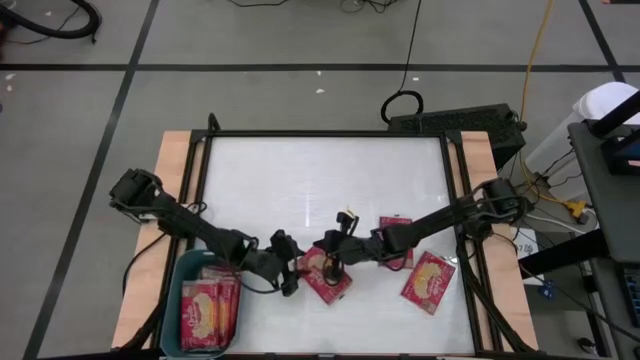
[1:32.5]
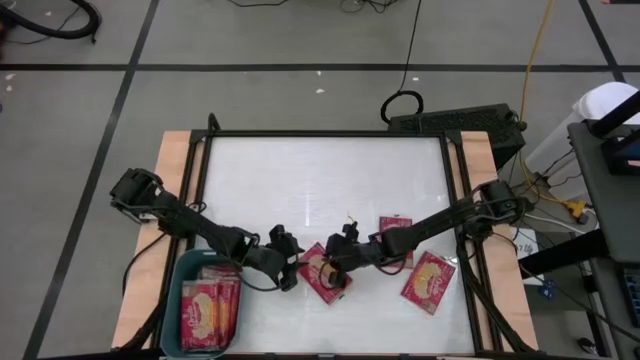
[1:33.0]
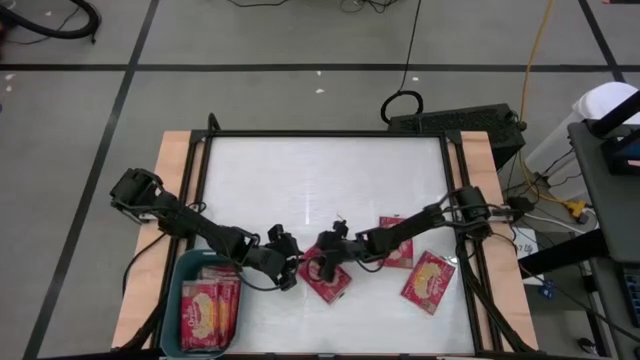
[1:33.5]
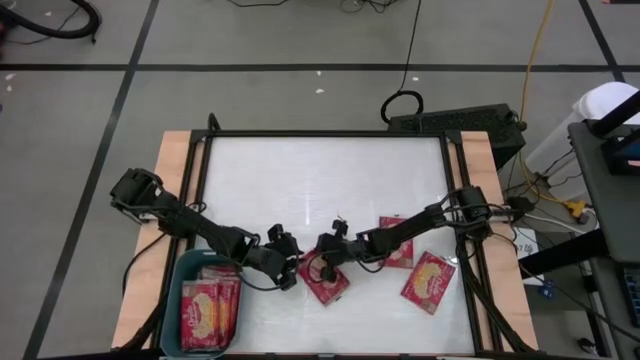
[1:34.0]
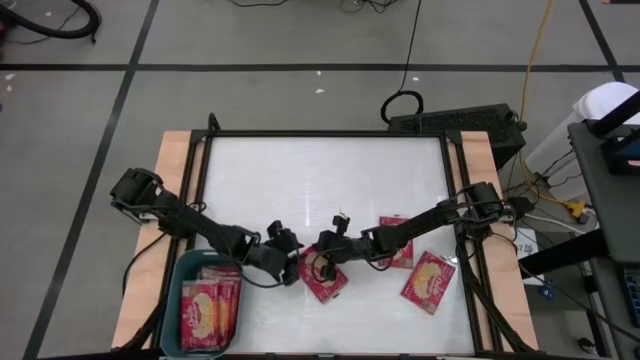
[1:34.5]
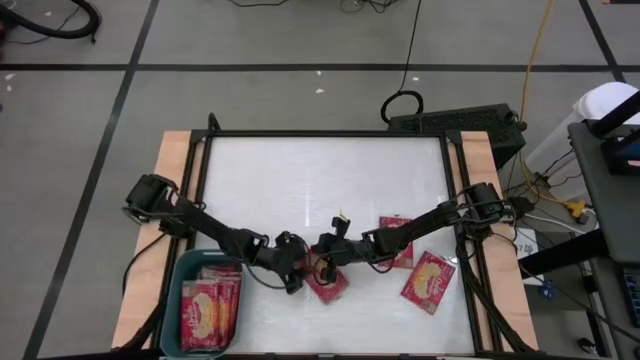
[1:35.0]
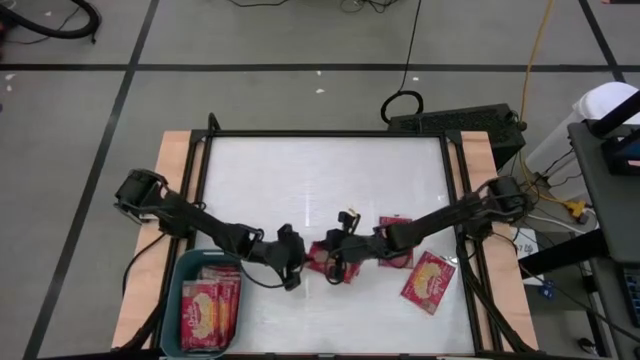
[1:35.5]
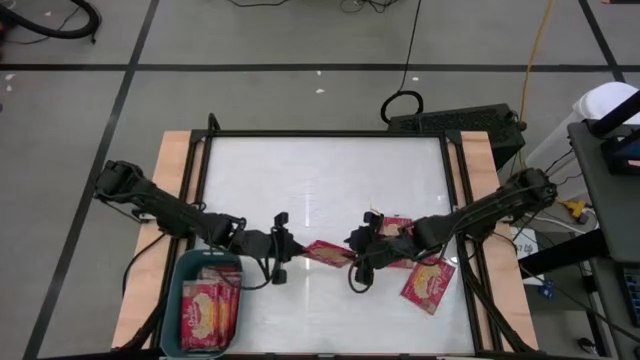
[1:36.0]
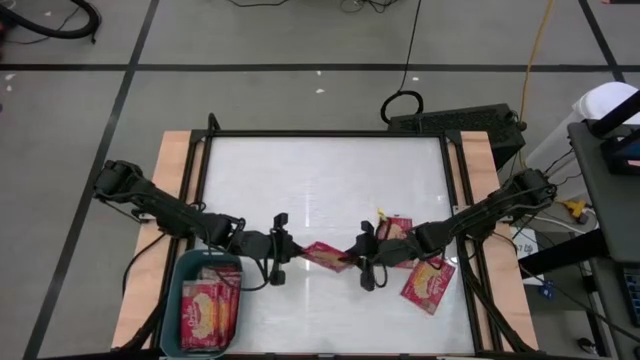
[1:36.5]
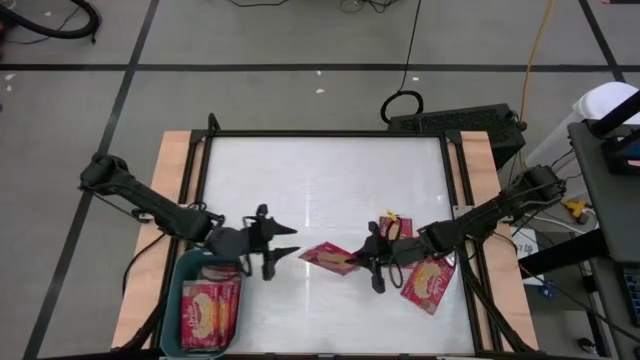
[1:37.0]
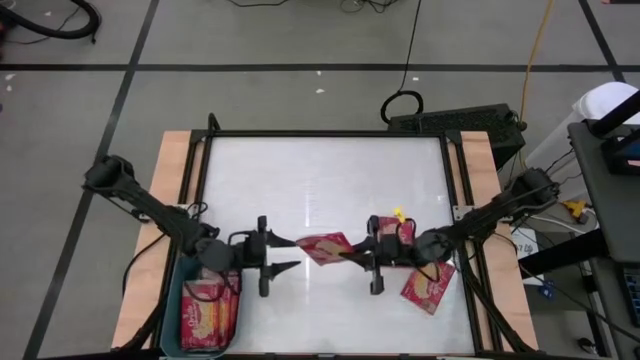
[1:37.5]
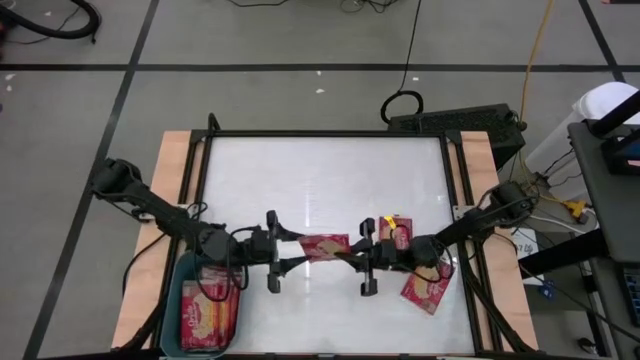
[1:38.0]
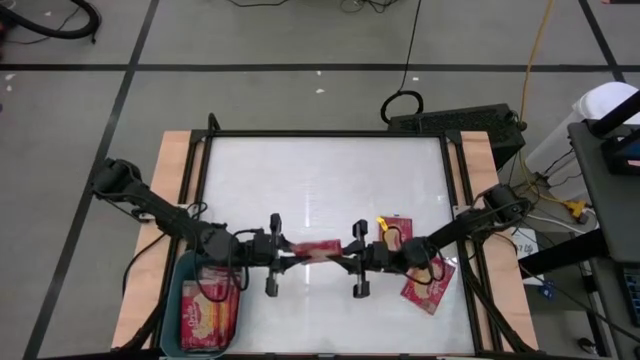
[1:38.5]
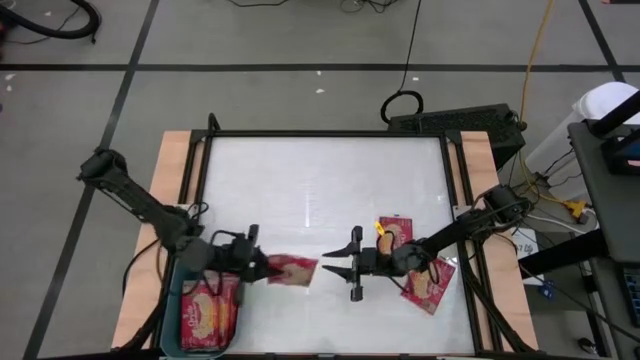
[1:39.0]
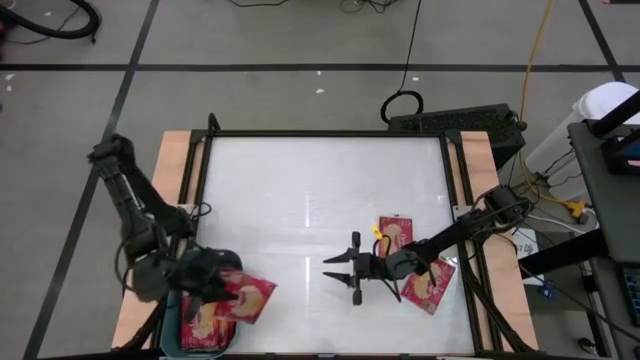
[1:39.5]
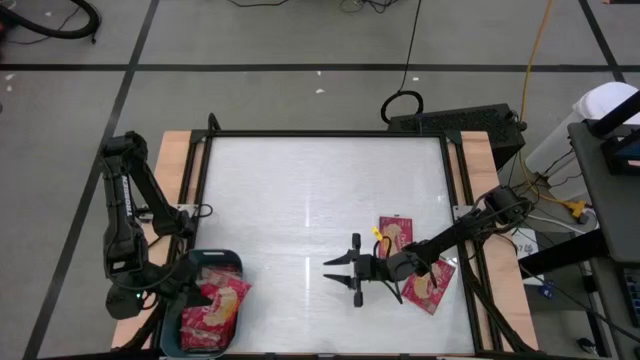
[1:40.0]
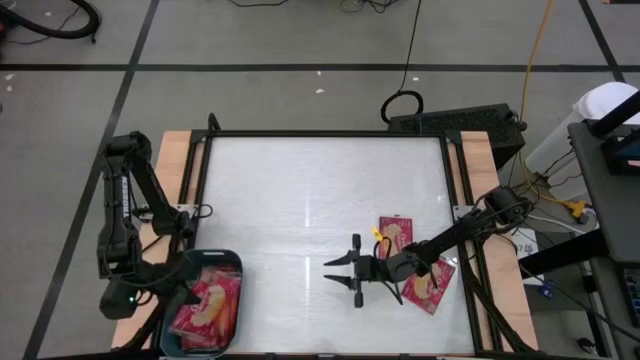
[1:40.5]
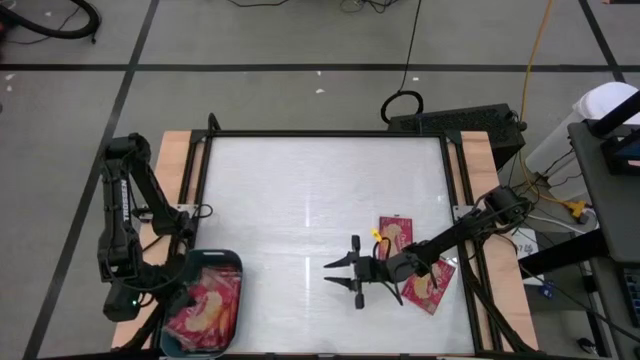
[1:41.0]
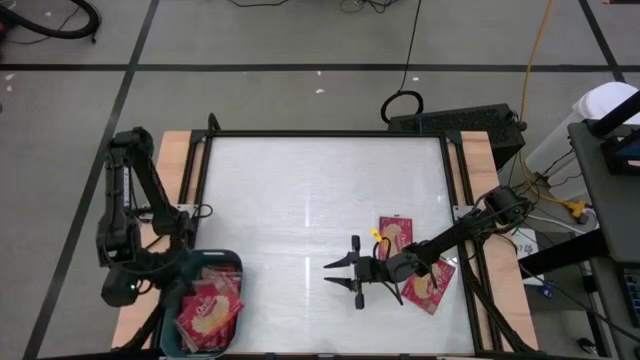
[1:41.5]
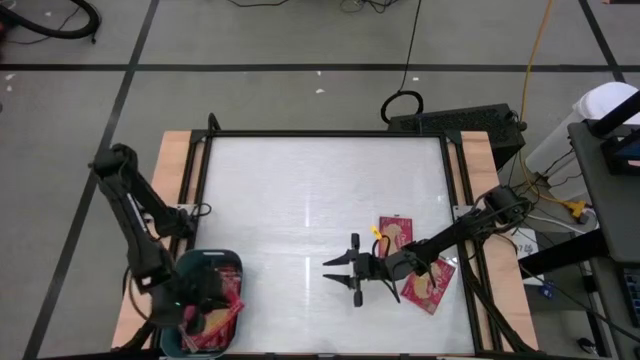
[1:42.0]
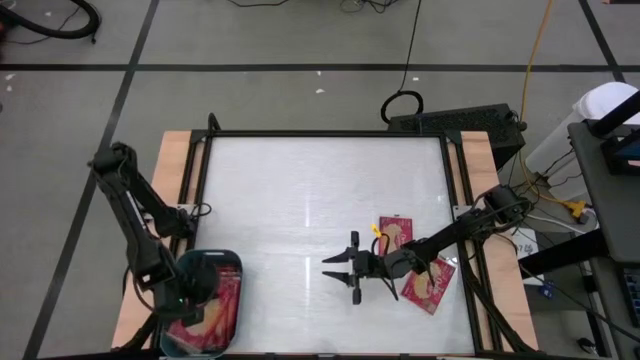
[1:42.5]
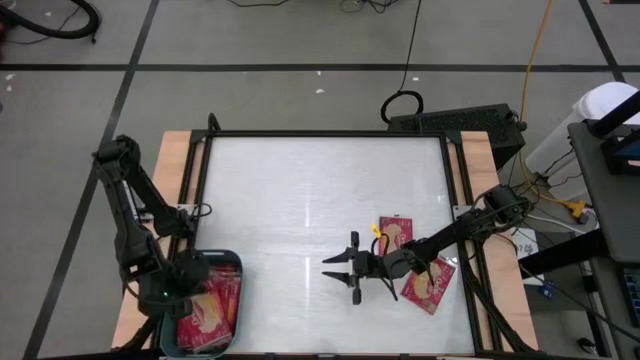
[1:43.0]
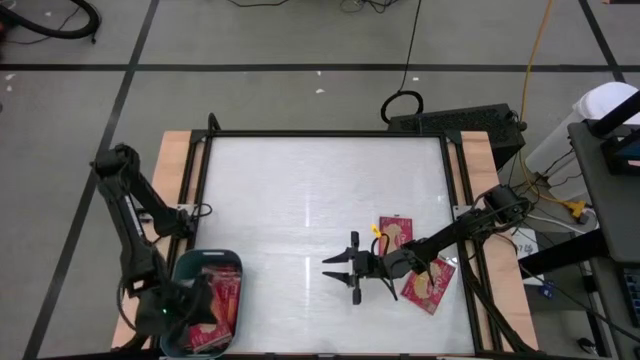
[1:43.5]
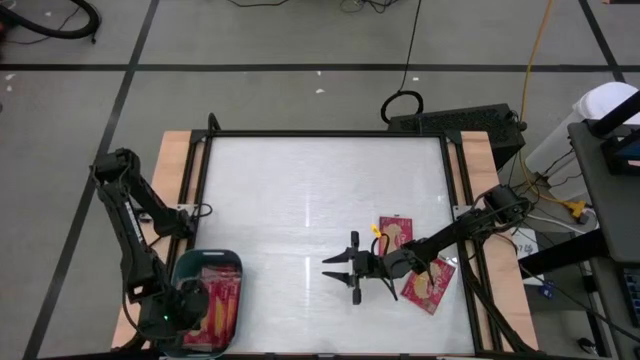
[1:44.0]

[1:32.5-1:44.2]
Task: Sort popcorn bags into baskets
Put the red popcorn bag into the blue bin

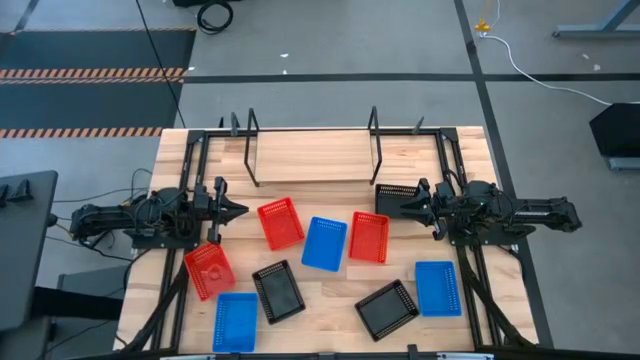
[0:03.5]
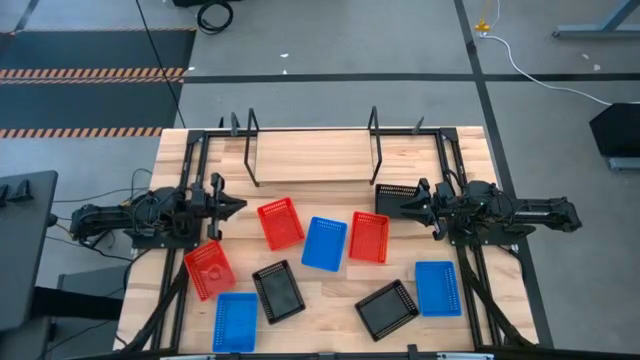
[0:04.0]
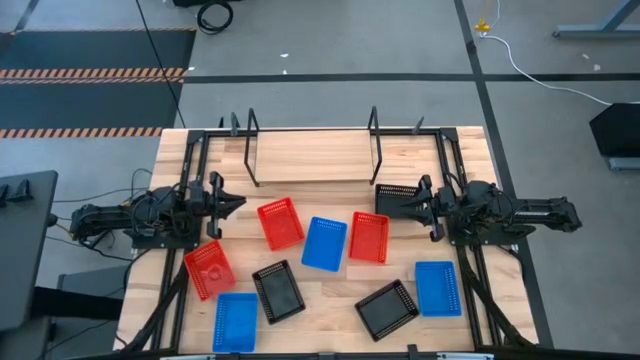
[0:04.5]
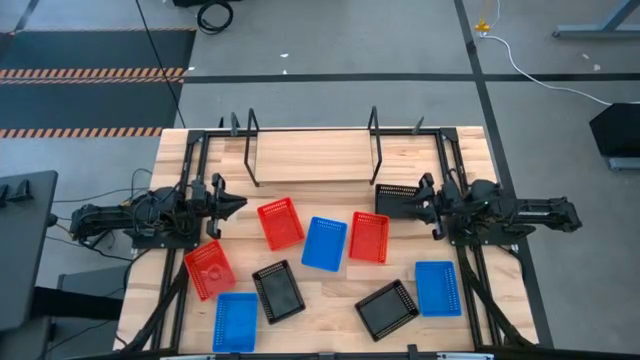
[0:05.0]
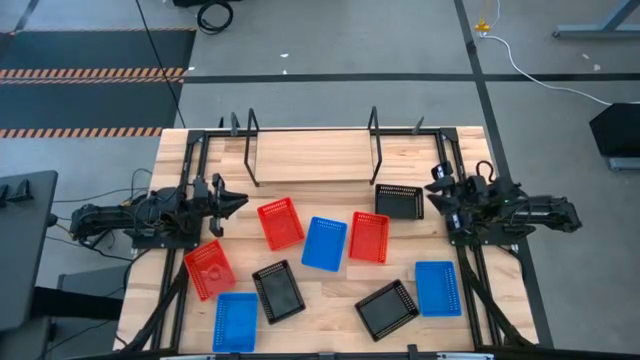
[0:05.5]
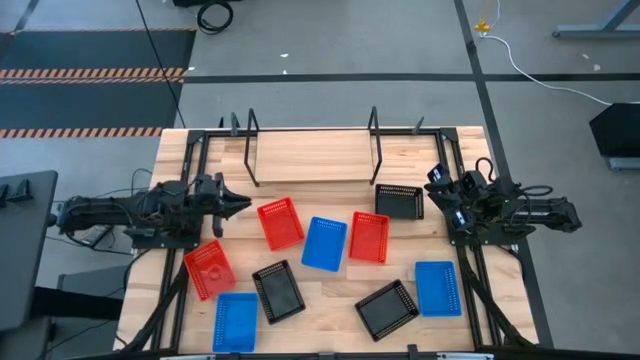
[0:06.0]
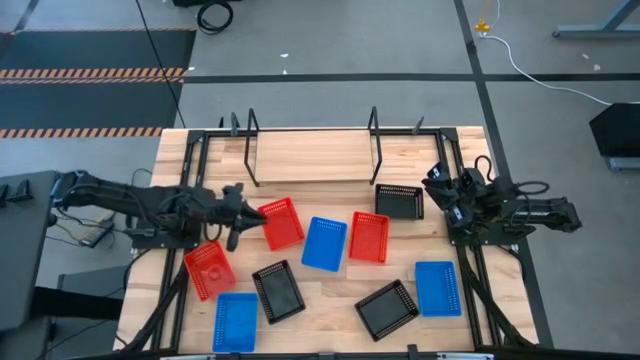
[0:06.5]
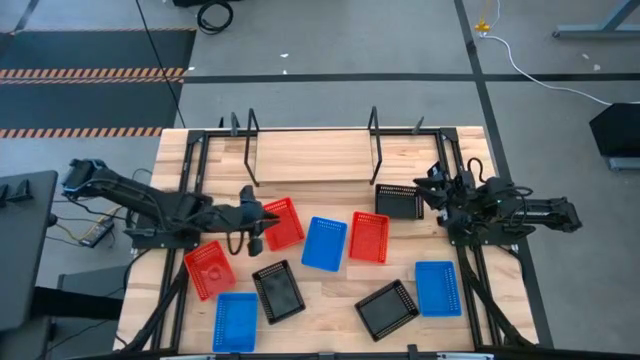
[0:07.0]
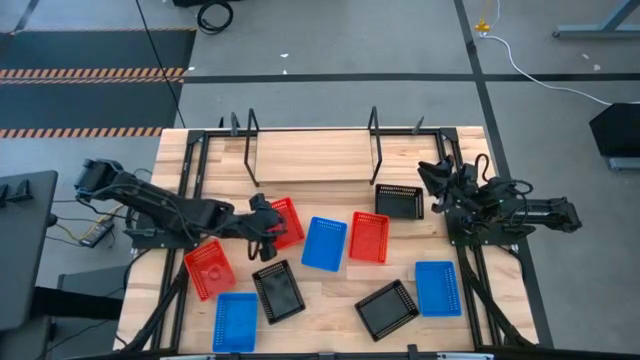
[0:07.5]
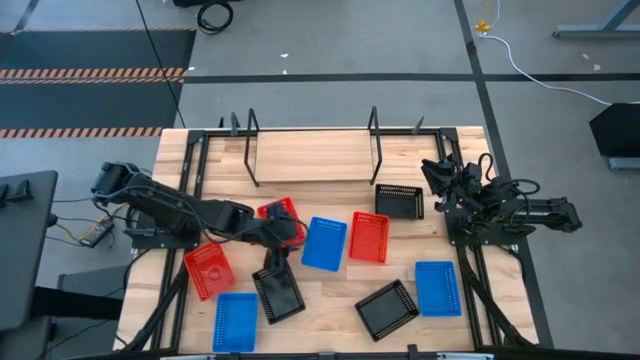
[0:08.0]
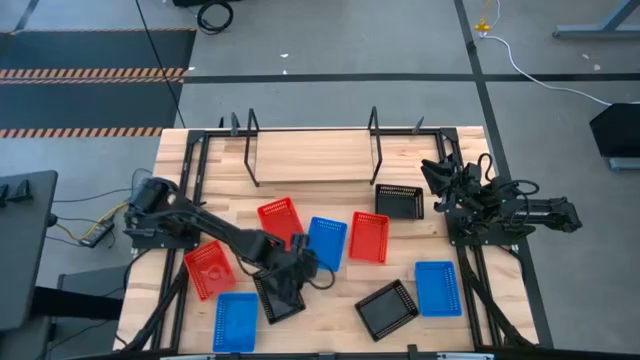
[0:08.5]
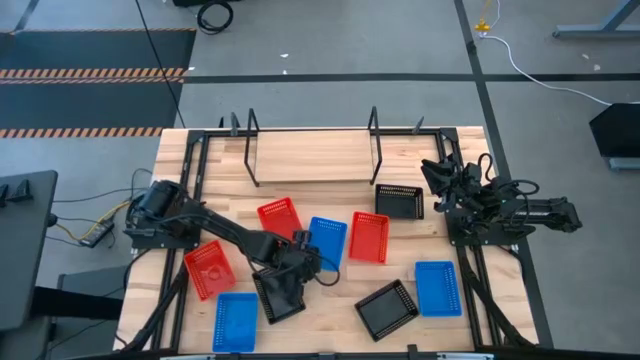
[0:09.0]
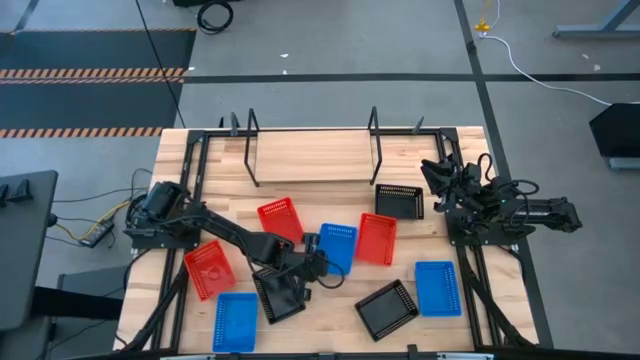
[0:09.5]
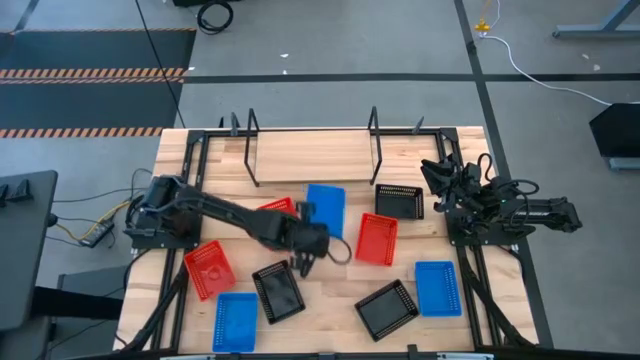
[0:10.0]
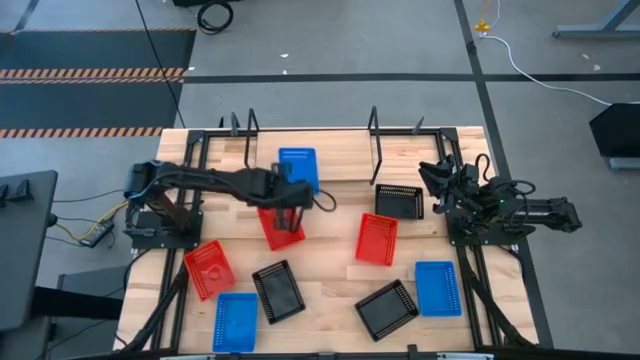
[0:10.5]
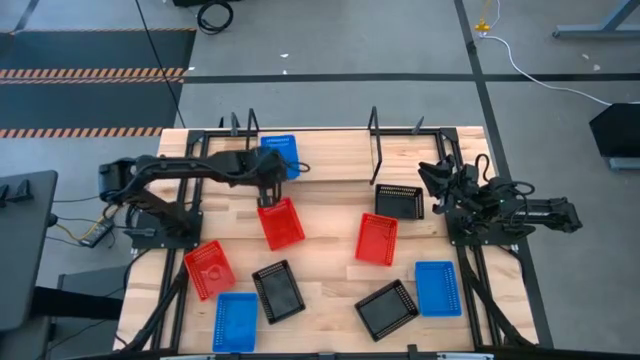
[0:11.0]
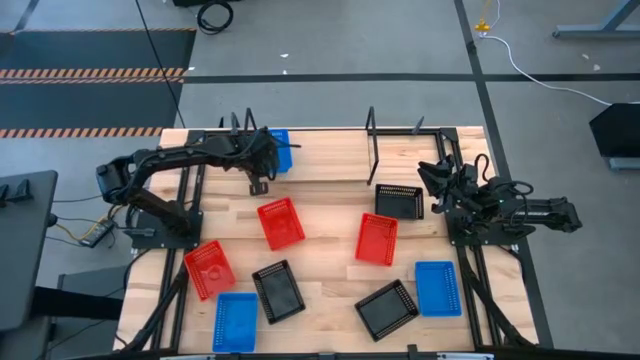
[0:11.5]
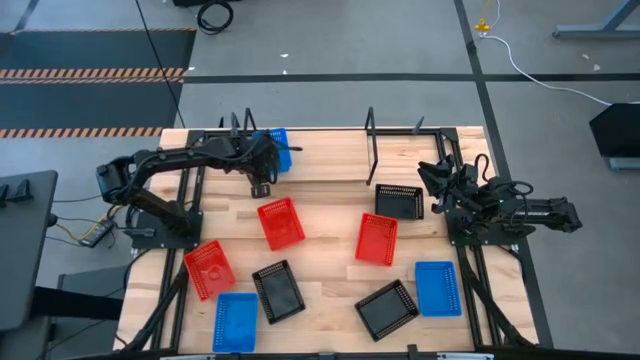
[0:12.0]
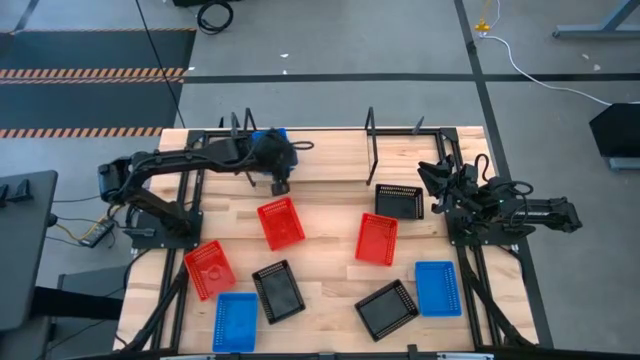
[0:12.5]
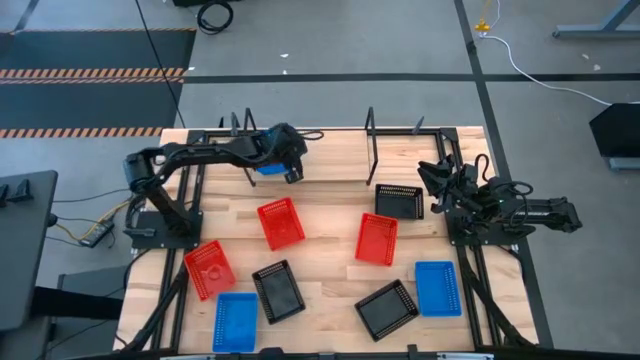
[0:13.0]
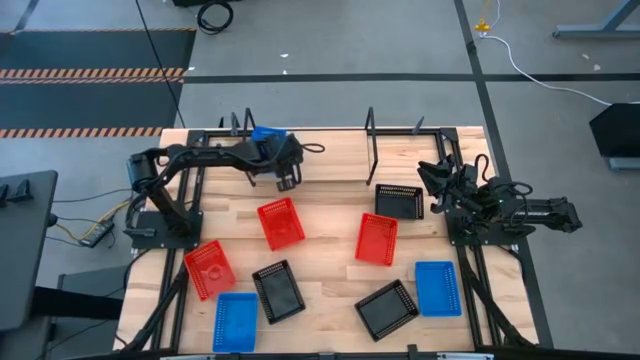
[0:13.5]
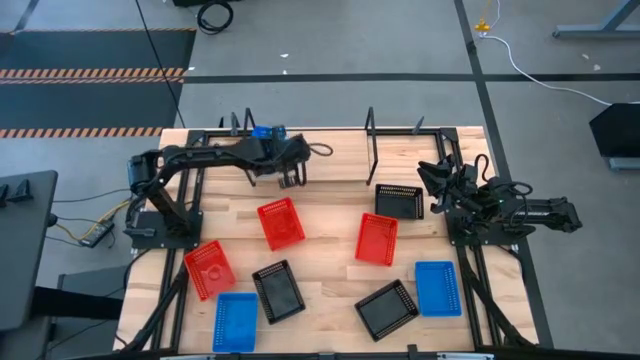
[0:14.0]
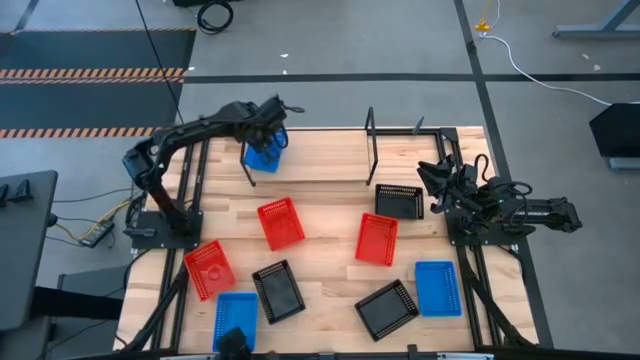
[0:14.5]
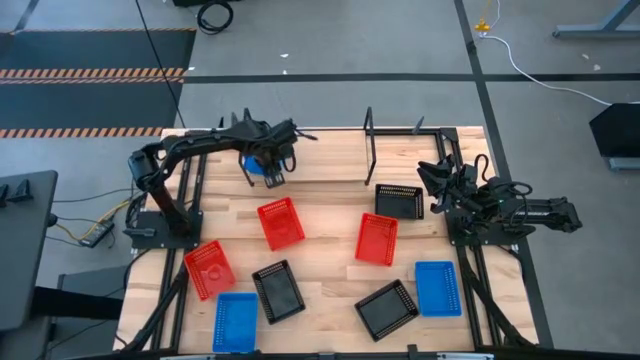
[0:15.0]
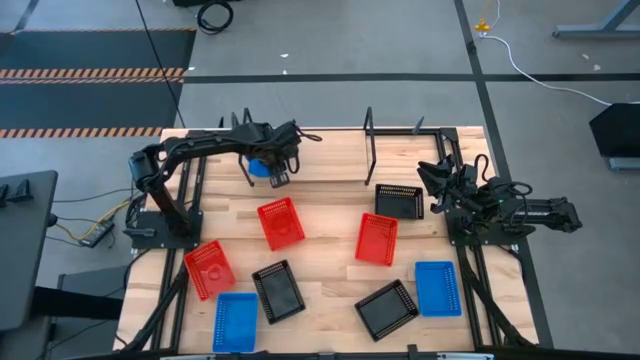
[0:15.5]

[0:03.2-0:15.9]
Task: Stack baskets on shelf by color
Put the top blue basket on the shelf
